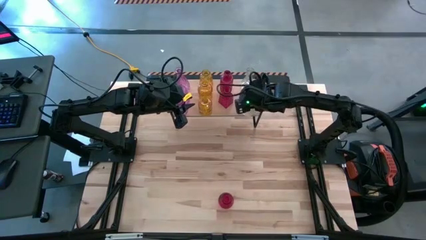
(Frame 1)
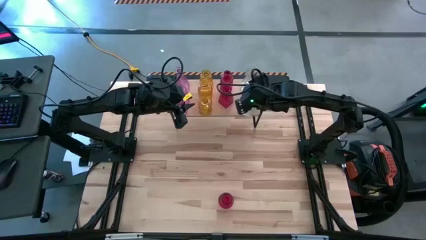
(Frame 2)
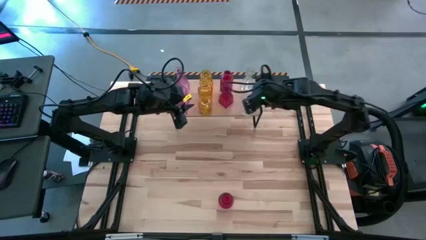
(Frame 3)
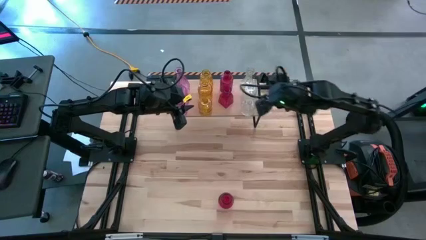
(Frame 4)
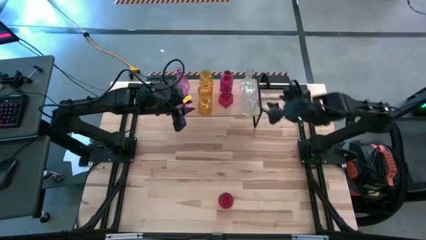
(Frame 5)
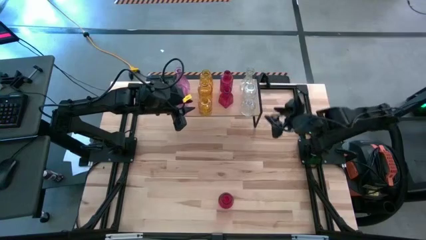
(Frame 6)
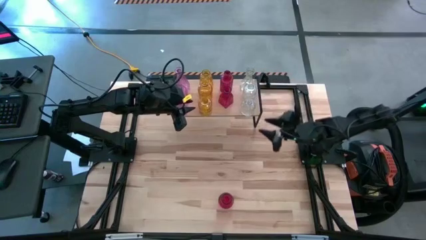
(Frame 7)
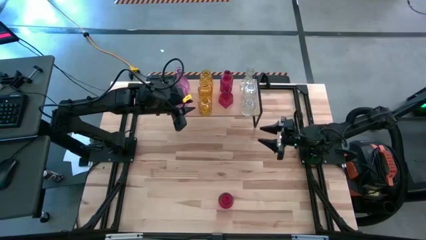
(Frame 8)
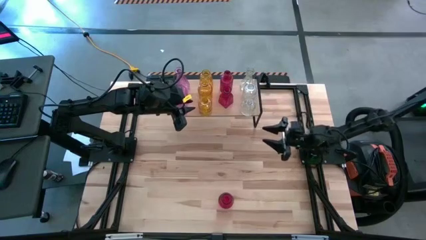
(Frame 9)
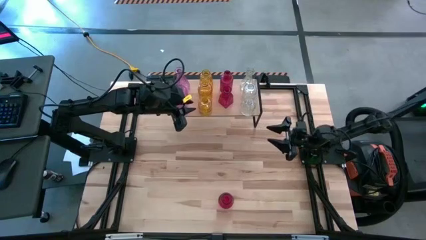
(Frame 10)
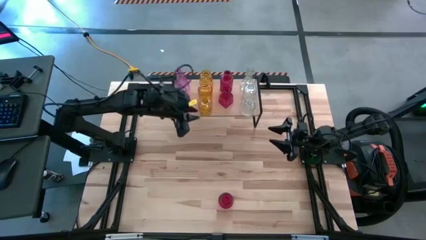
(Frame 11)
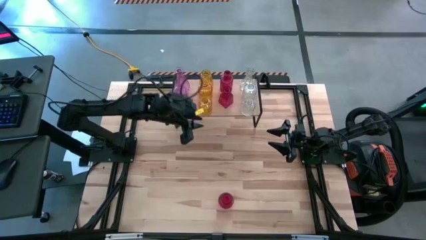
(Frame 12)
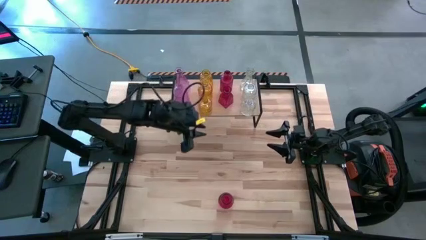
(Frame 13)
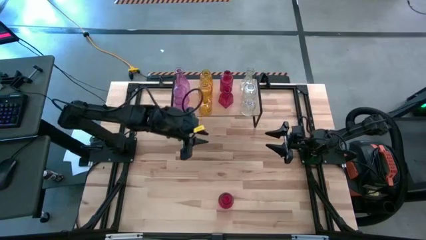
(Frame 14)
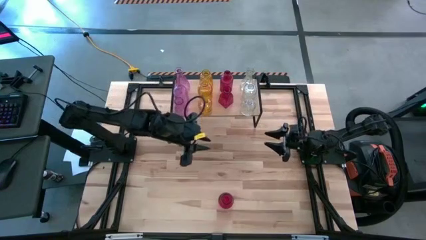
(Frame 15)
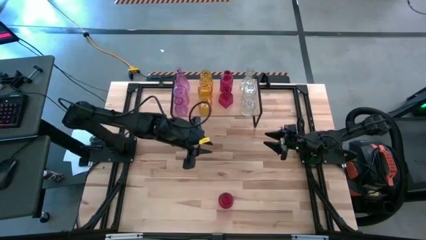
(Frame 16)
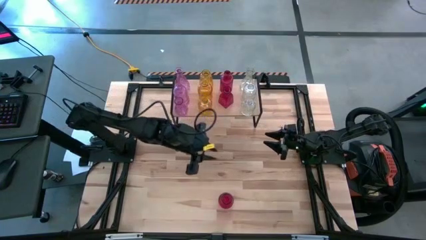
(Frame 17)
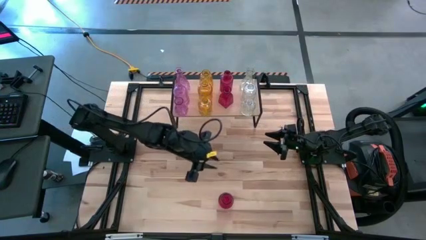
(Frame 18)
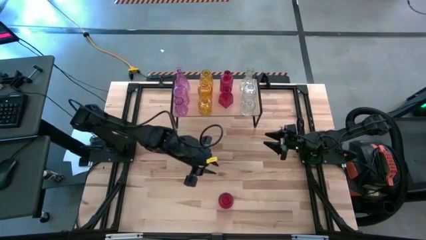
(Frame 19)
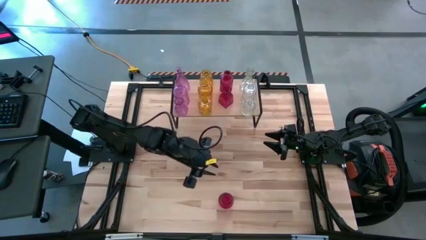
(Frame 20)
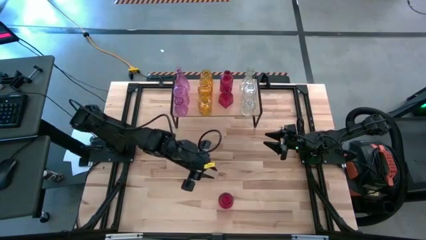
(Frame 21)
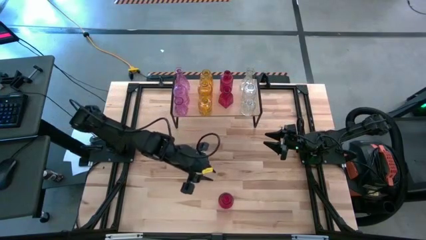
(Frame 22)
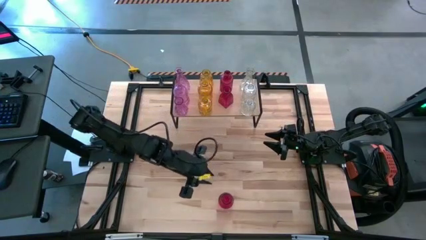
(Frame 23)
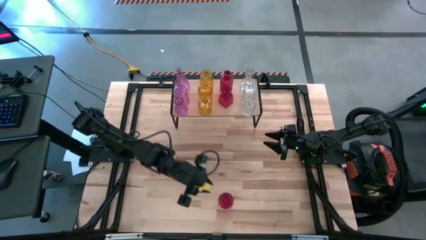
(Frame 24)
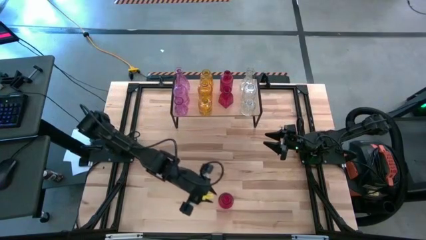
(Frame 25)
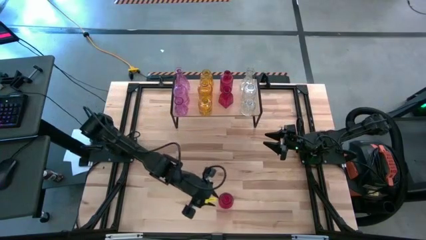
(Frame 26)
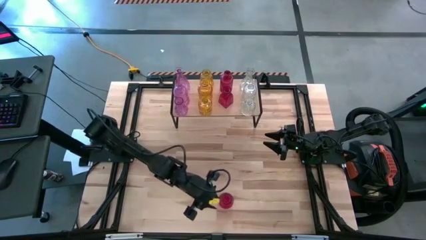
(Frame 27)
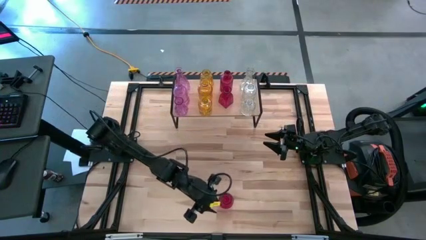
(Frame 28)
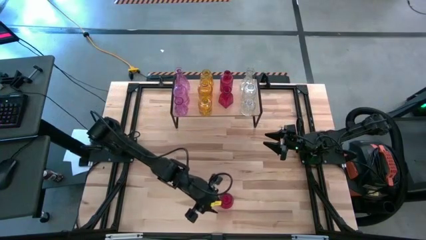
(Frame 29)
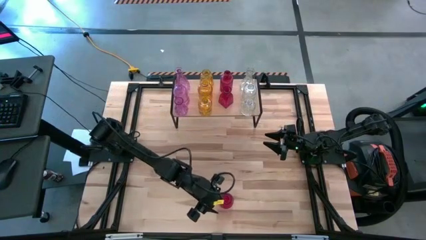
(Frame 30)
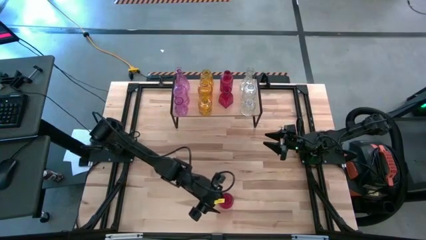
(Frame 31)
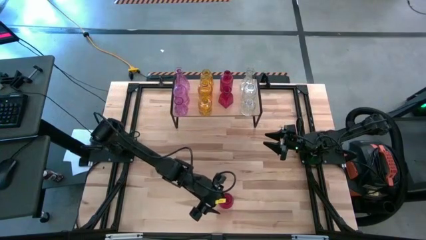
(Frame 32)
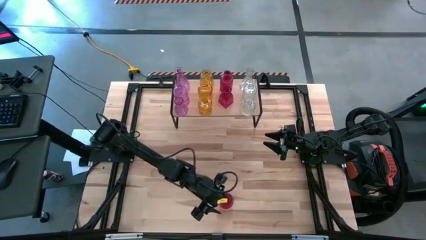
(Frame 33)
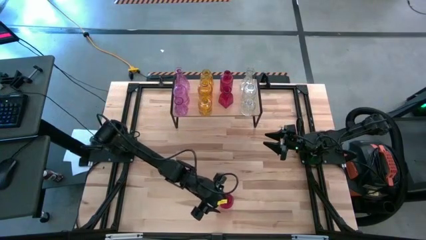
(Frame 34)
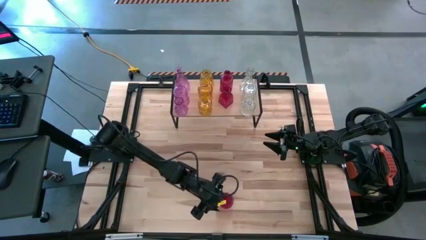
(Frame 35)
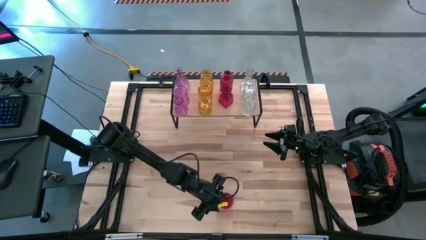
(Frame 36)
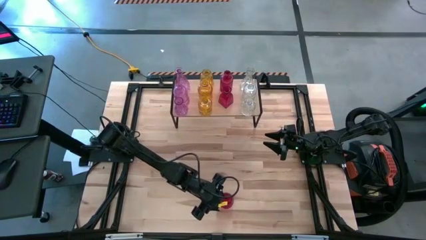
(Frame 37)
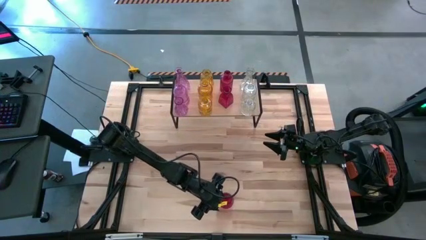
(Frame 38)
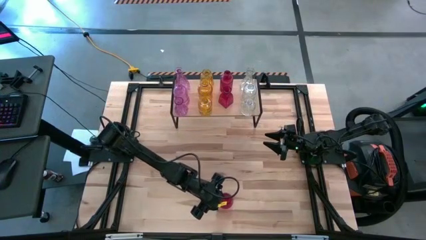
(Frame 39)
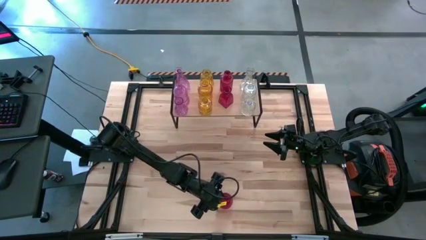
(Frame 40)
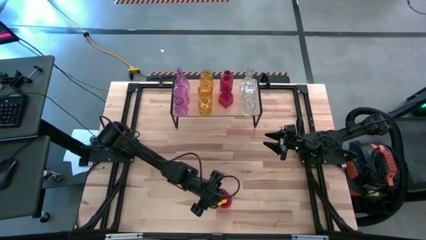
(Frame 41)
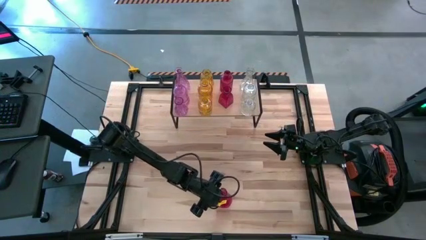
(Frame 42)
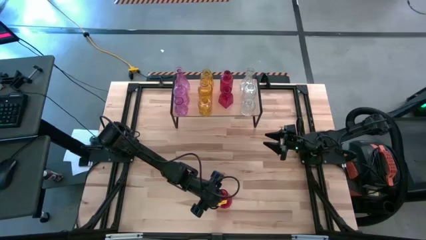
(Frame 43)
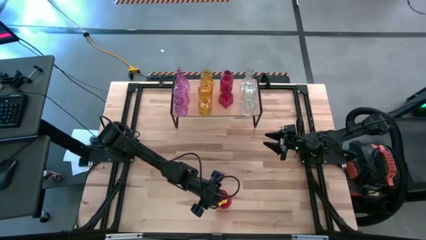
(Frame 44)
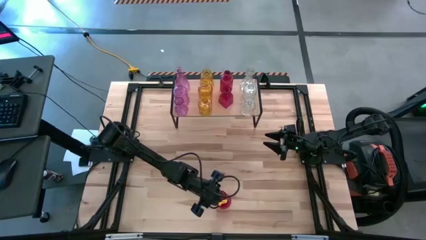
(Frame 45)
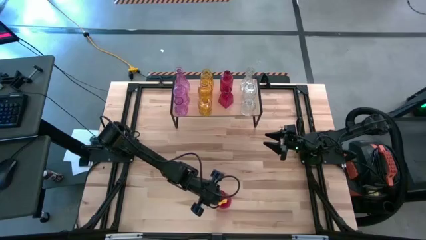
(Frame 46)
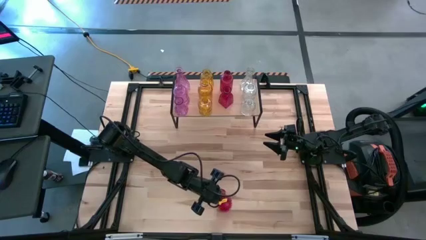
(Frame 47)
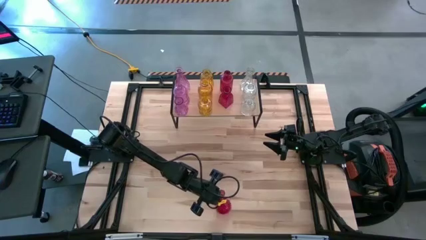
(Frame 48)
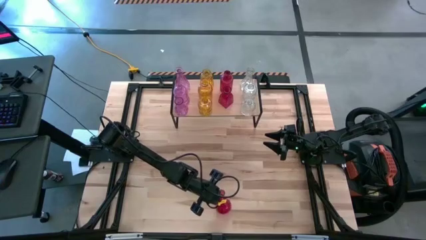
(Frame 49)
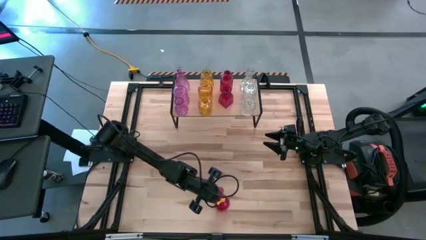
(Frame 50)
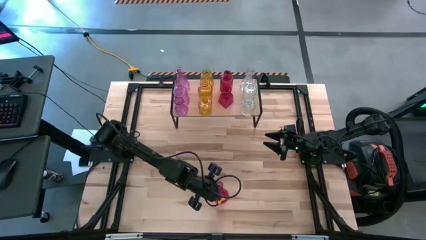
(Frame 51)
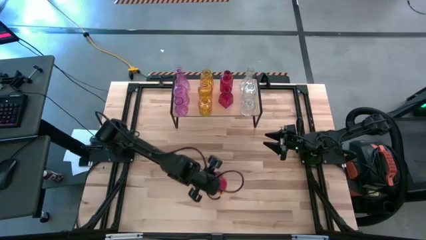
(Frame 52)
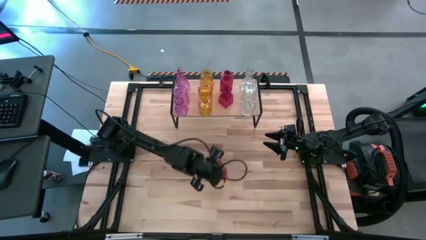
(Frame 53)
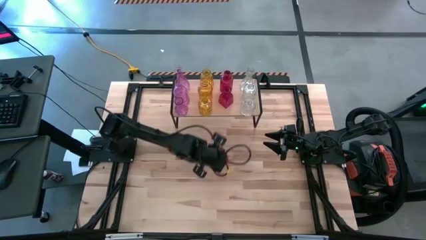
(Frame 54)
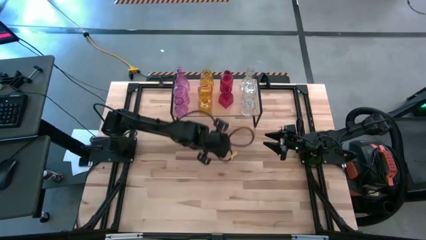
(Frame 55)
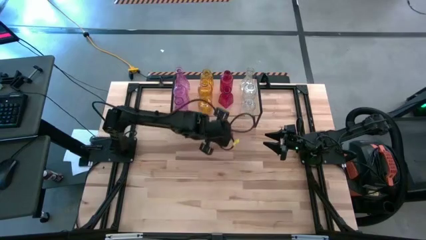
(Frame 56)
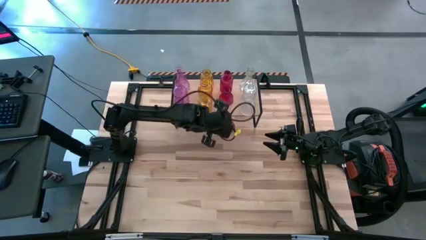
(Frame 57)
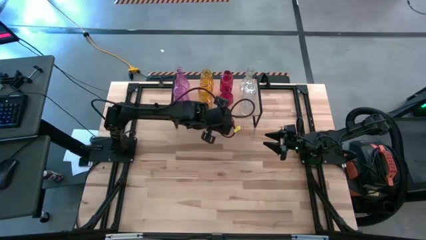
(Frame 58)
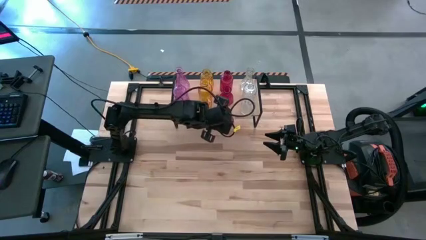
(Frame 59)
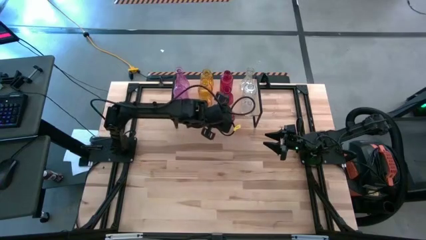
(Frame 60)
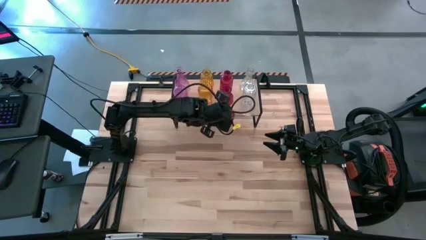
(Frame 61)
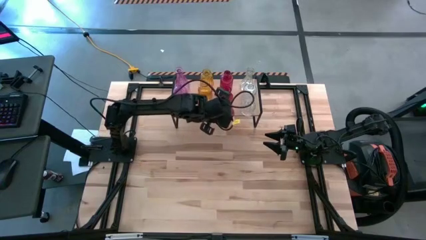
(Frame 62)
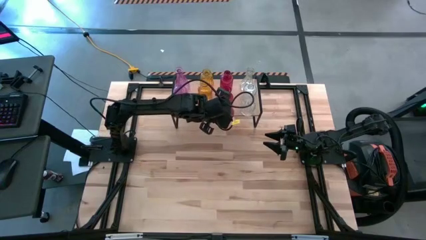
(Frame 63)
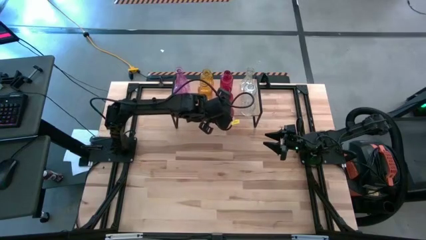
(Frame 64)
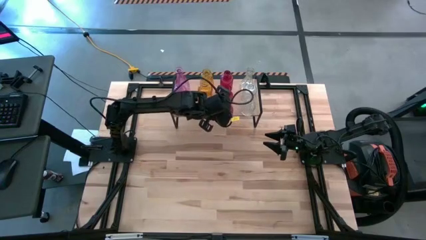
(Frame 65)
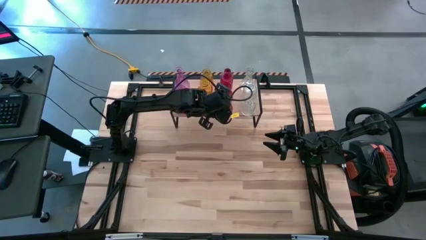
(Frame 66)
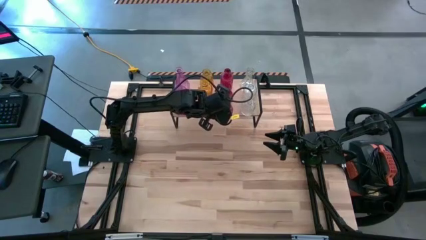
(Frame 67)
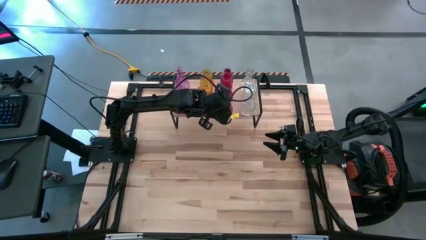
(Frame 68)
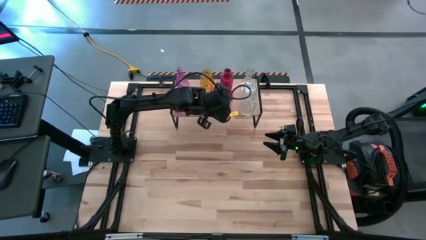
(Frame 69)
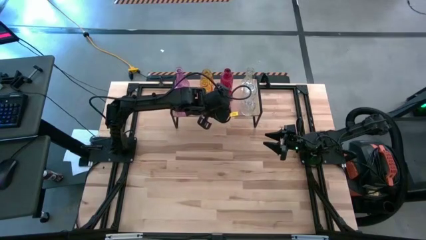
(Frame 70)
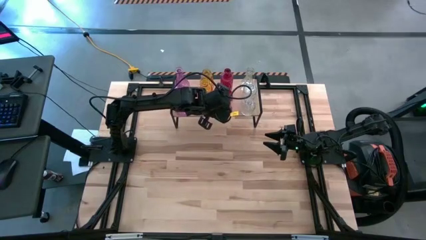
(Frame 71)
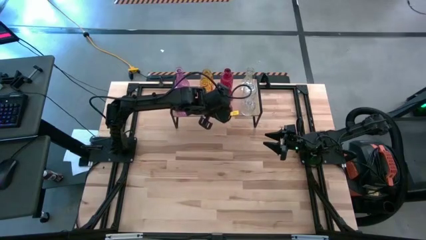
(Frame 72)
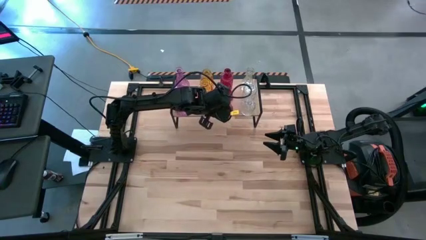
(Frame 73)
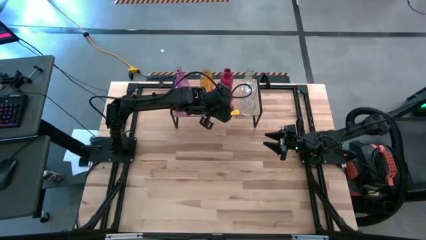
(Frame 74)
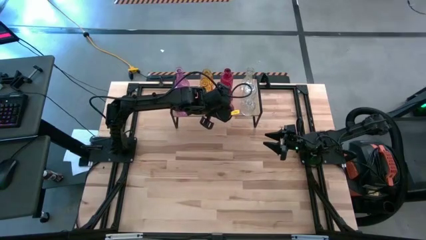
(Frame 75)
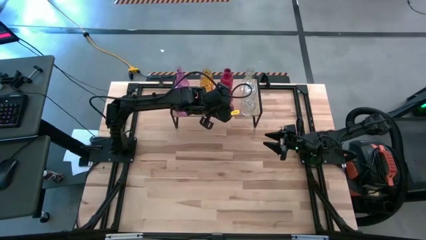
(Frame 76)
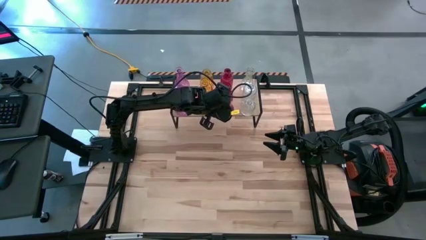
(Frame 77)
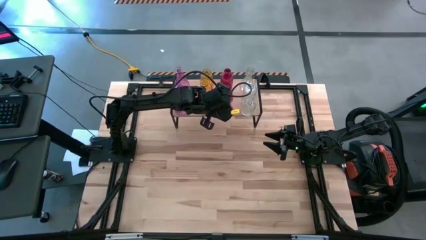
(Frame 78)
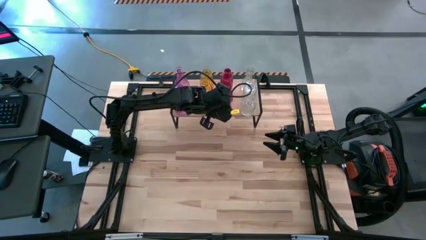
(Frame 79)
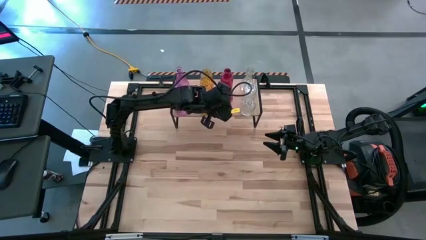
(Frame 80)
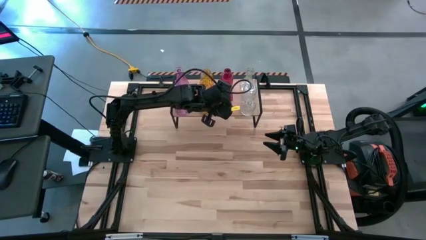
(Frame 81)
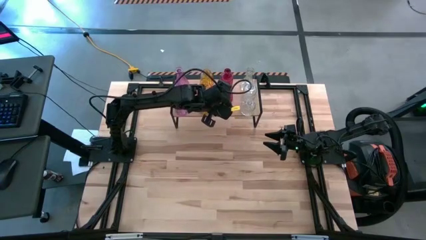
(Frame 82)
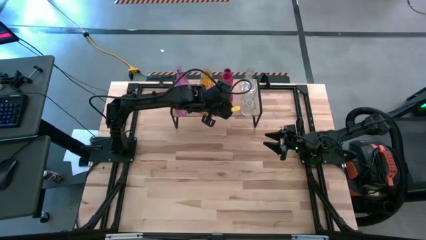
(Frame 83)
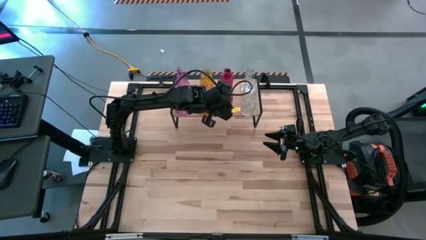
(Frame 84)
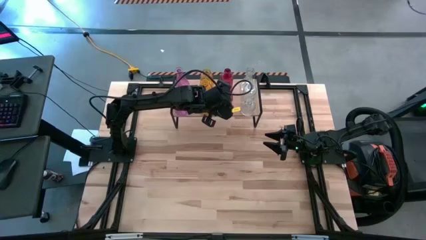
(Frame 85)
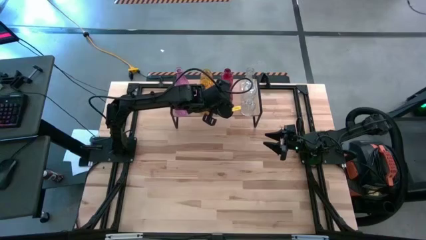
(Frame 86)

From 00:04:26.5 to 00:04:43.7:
Task: sort vases onto shelf
Put the red vase on the shelf and align it with the other red vases
